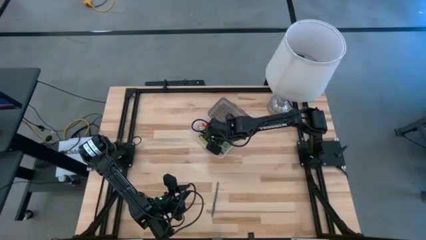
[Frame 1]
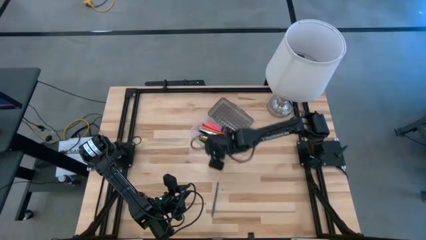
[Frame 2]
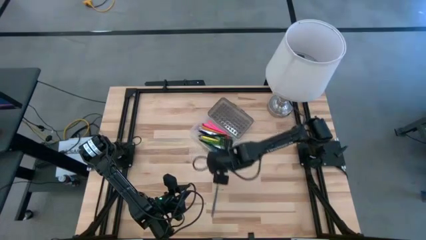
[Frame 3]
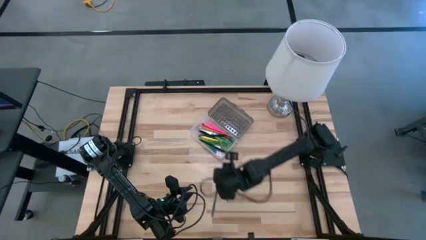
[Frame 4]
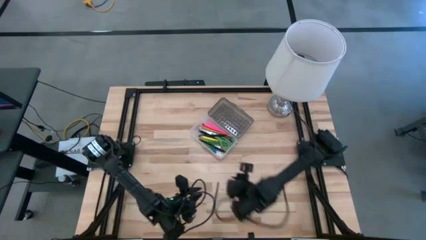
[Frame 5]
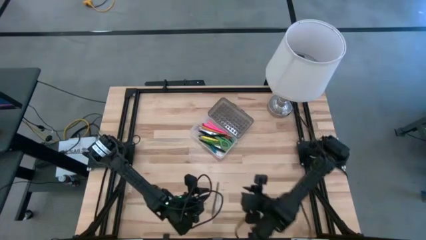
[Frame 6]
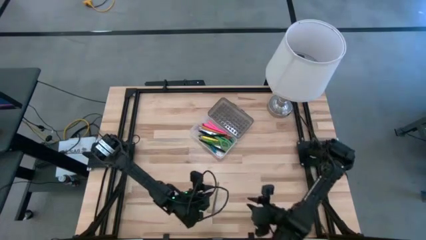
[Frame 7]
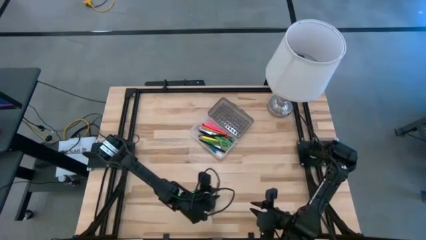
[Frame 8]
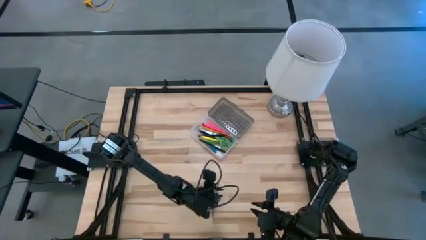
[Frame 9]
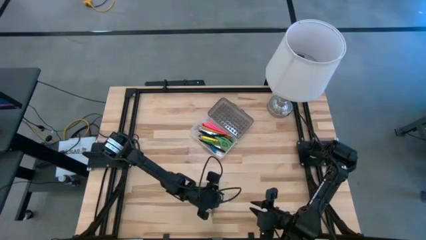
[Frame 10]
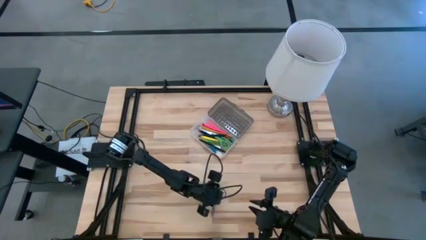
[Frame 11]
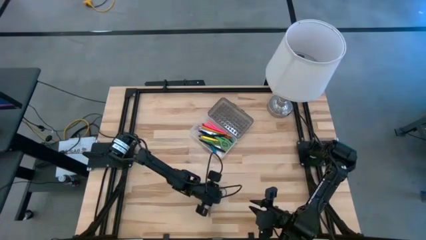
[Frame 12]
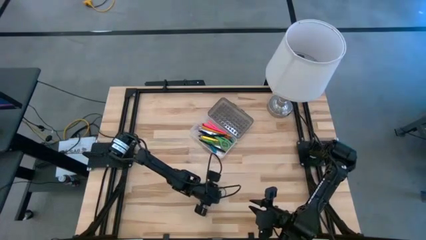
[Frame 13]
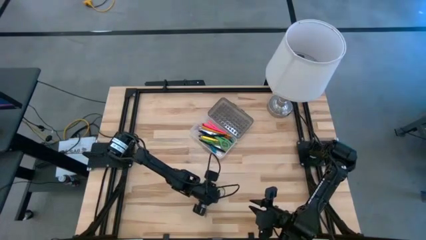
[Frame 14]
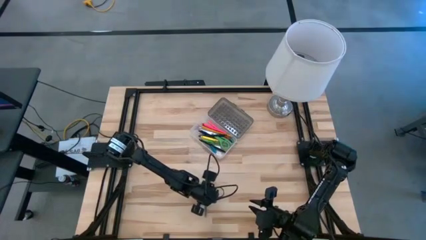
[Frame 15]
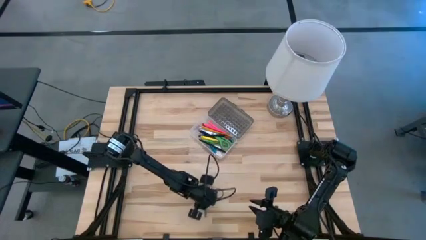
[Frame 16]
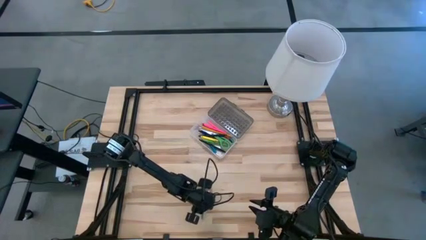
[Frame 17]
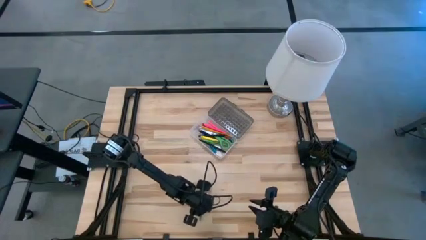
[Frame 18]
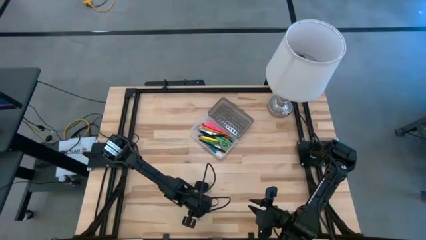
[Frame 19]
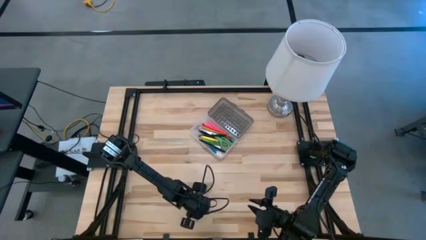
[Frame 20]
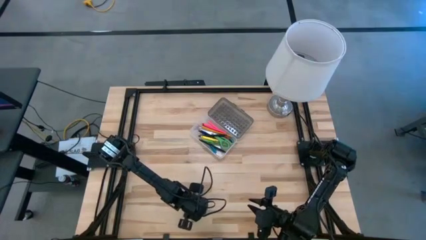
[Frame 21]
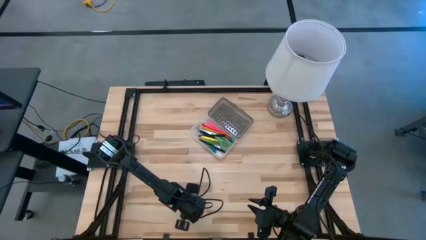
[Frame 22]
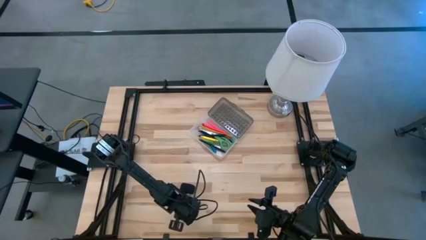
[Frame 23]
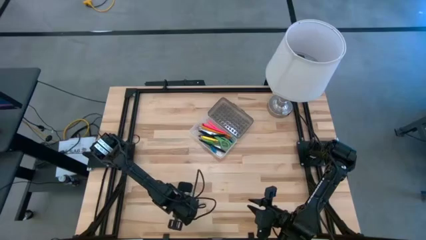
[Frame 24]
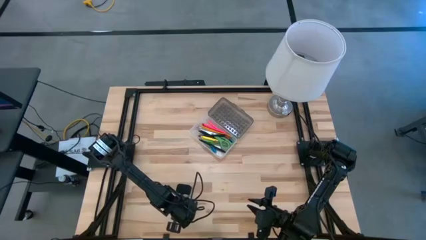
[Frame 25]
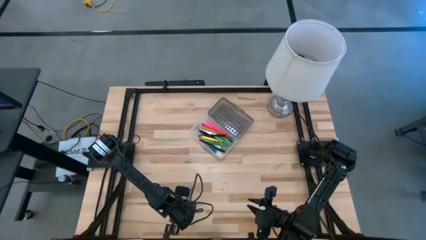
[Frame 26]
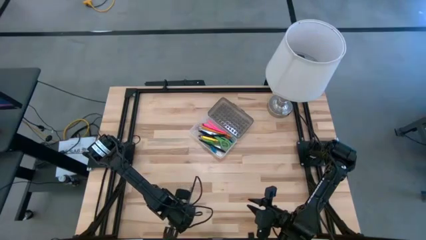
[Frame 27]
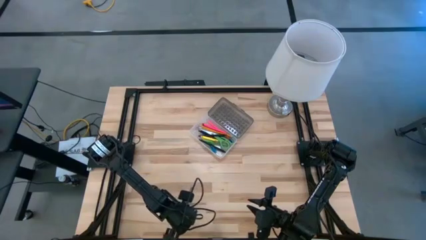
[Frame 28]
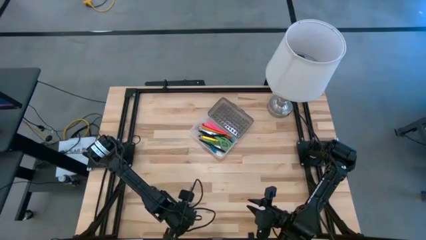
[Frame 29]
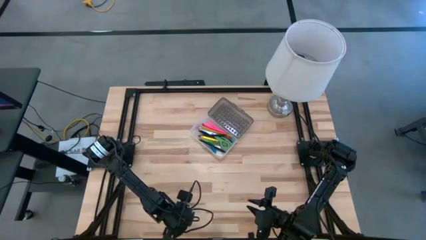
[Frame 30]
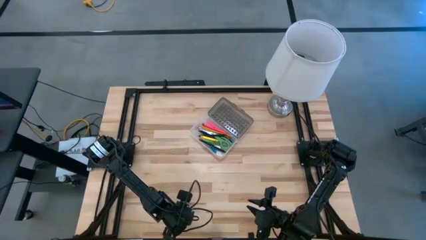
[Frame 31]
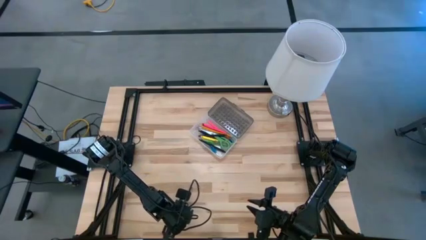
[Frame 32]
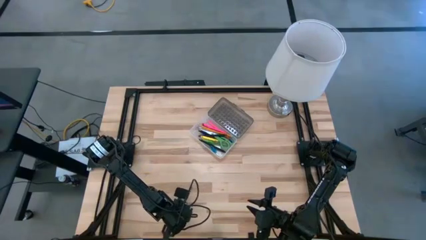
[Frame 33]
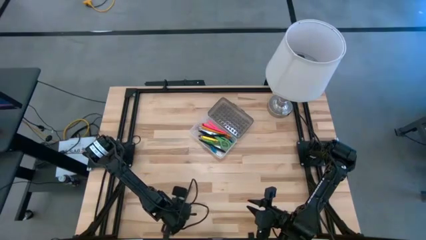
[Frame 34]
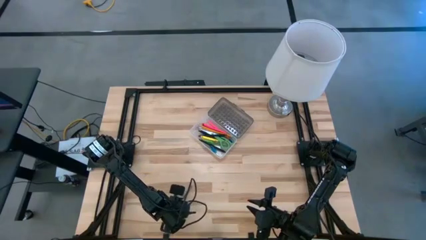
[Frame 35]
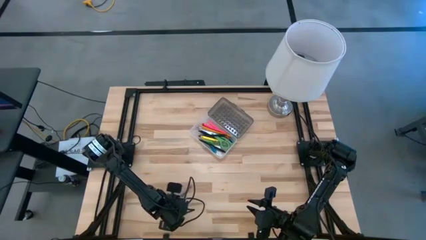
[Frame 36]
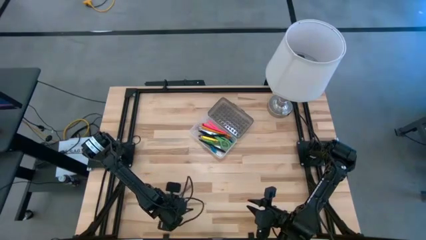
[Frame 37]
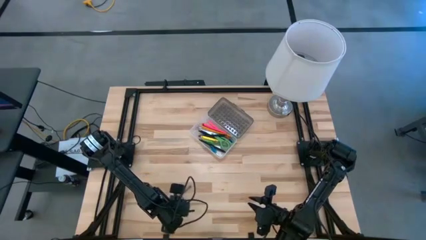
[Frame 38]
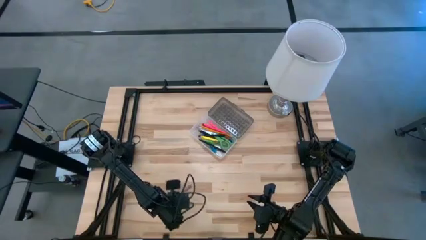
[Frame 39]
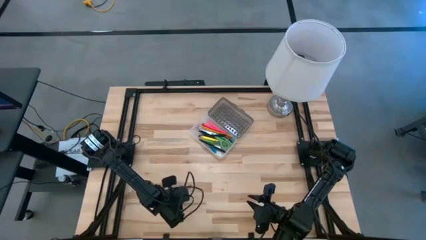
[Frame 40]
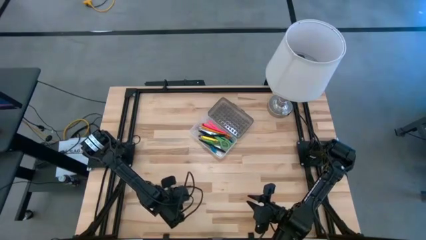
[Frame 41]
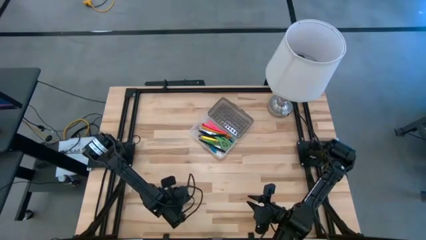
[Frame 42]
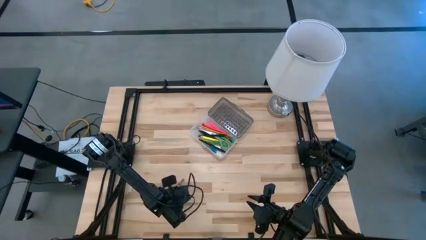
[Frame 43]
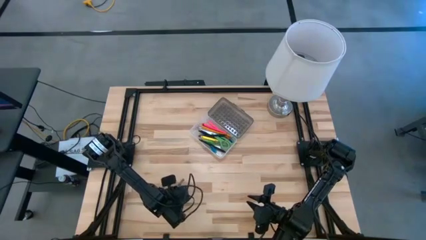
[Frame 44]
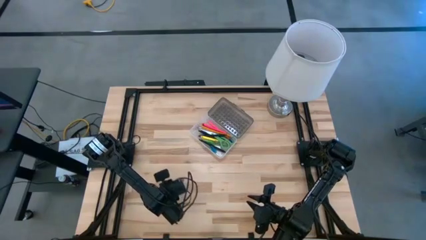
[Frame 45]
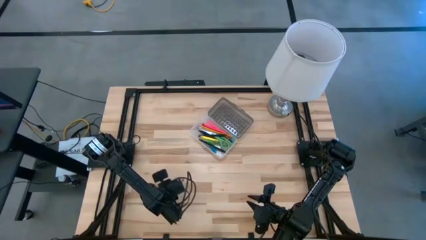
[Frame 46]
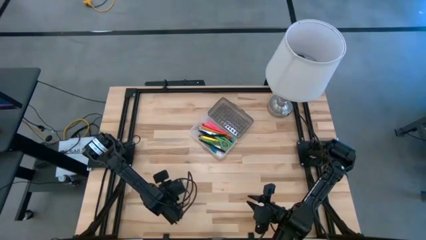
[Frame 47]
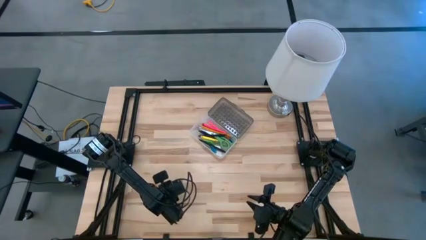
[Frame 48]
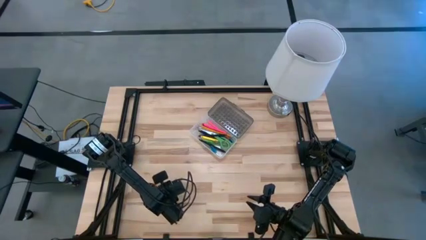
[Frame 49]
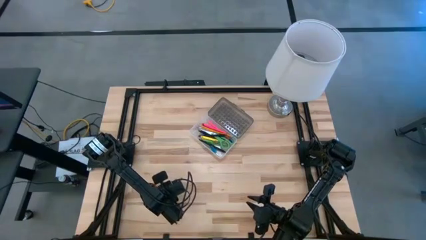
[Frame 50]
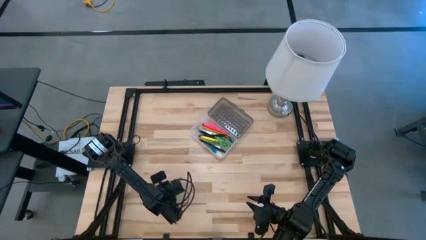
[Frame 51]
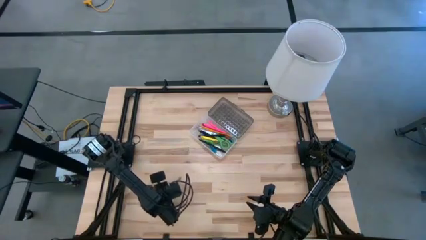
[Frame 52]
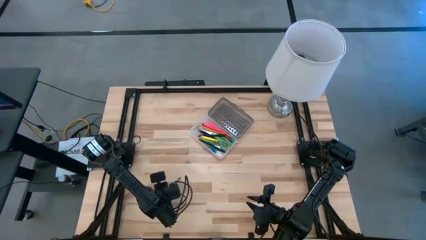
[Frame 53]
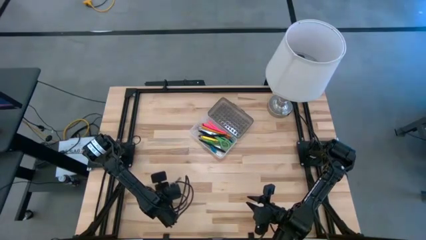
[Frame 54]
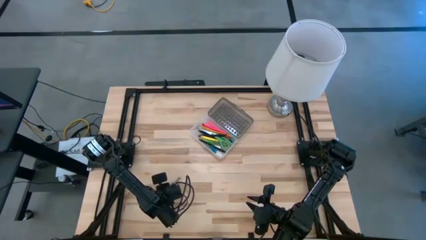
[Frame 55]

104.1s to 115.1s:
Task: Pick & place school supplies into a supply box
Put the gray pen into the black supply box

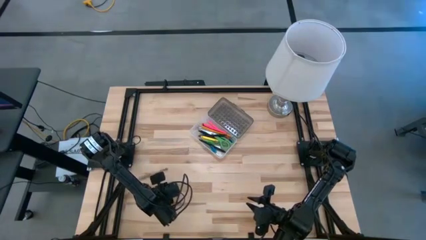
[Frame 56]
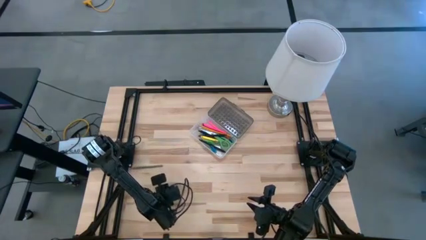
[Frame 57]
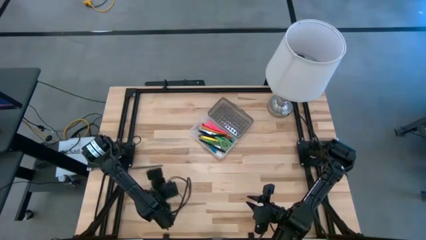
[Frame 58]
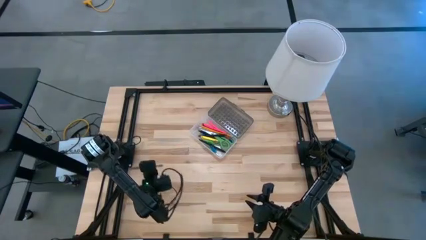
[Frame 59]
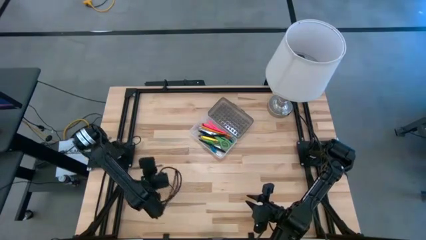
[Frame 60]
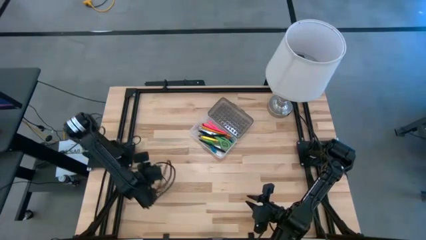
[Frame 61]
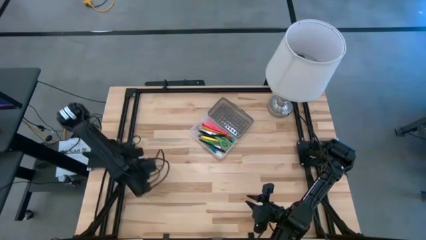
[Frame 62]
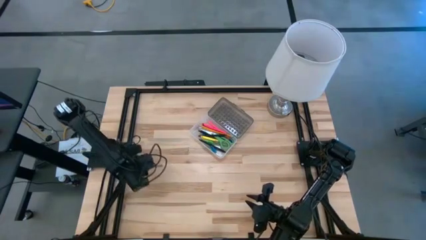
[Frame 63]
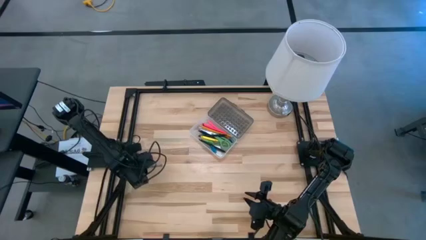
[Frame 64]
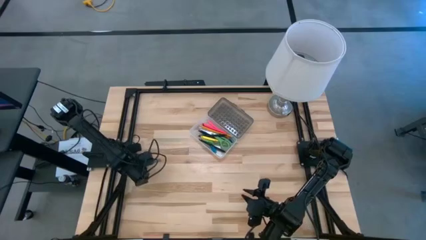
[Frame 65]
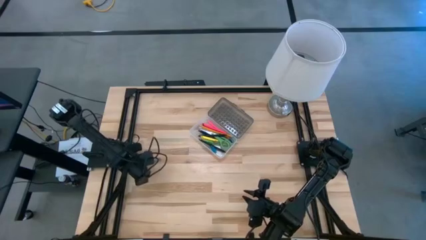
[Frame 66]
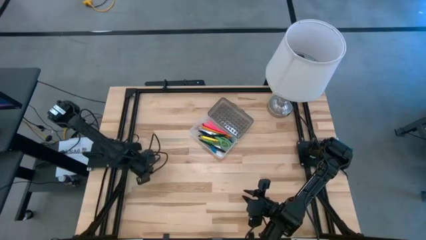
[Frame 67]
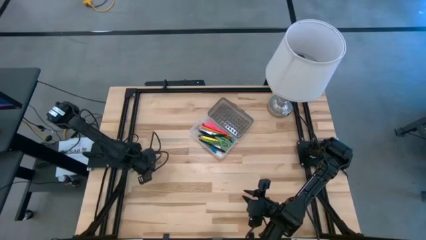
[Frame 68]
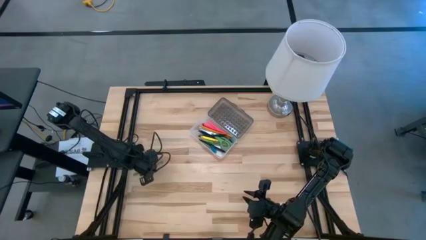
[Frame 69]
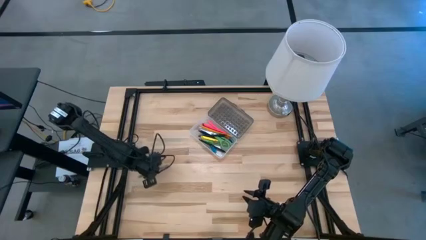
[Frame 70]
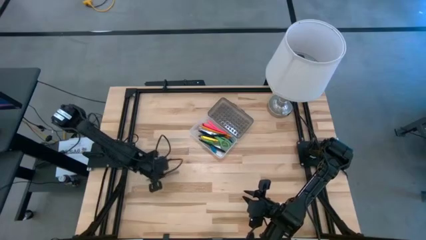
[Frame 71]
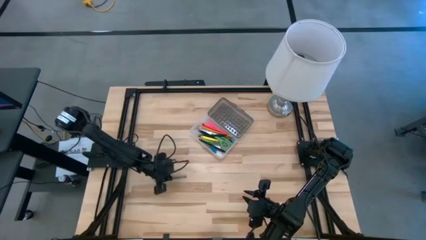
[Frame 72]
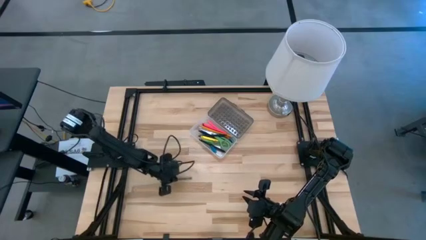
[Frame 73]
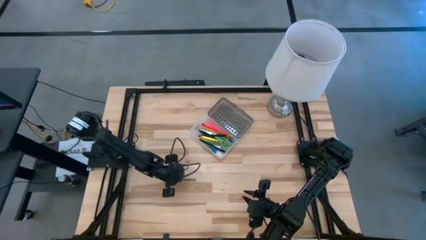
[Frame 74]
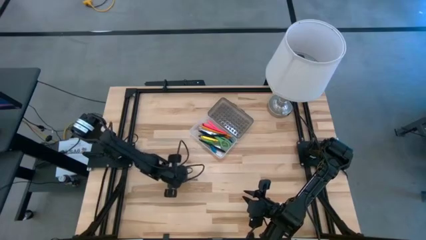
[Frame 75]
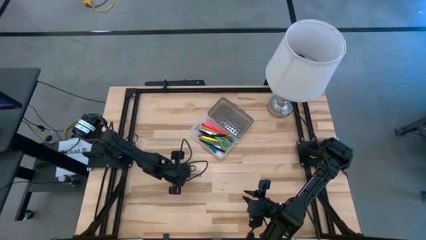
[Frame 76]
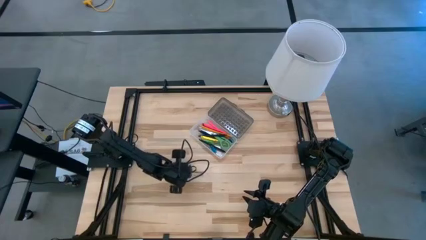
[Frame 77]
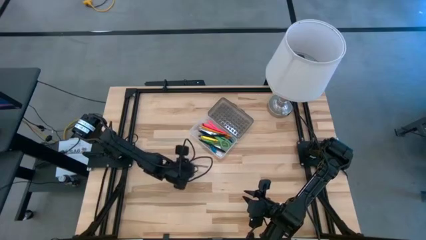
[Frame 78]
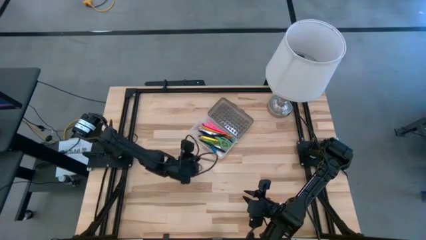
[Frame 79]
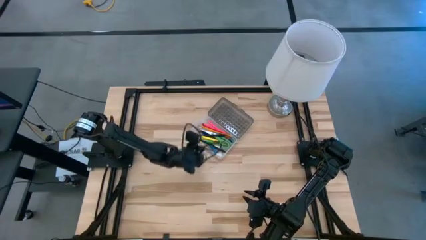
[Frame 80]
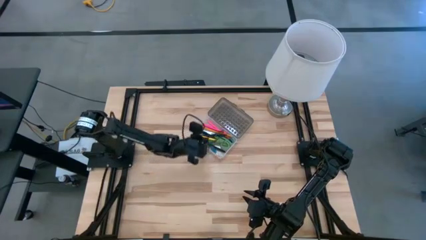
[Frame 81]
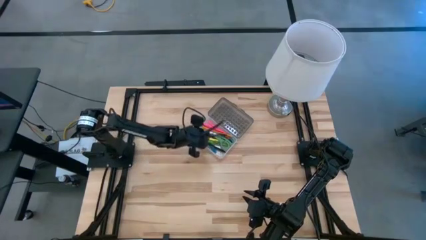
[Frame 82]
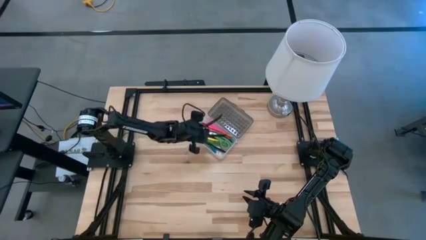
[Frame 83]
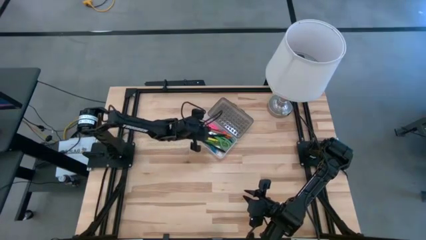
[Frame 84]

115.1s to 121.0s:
Put the gray pen into the black supply box
